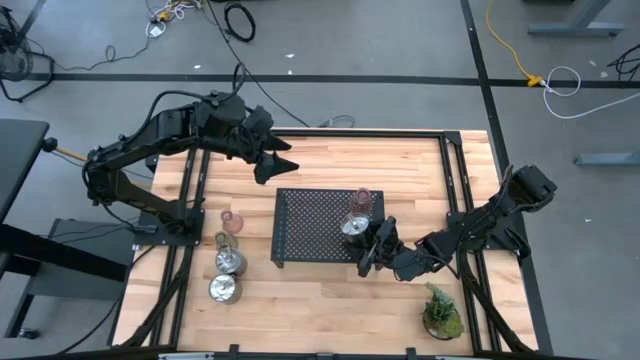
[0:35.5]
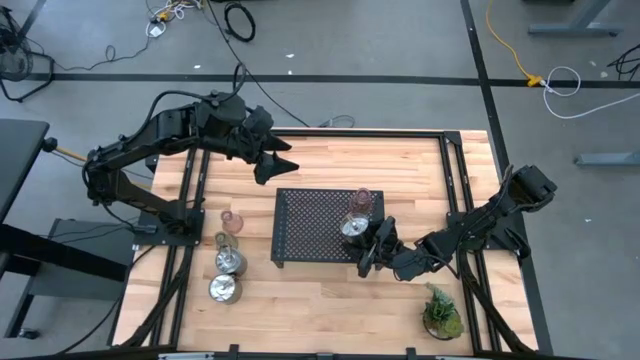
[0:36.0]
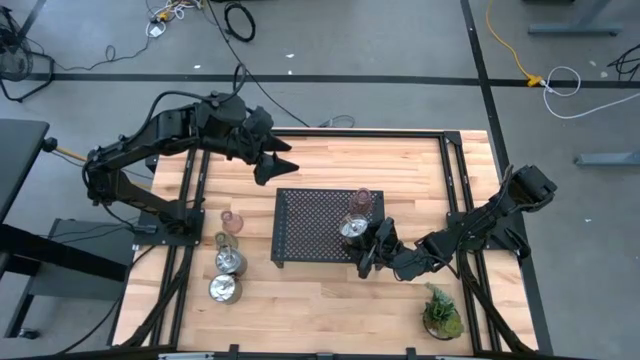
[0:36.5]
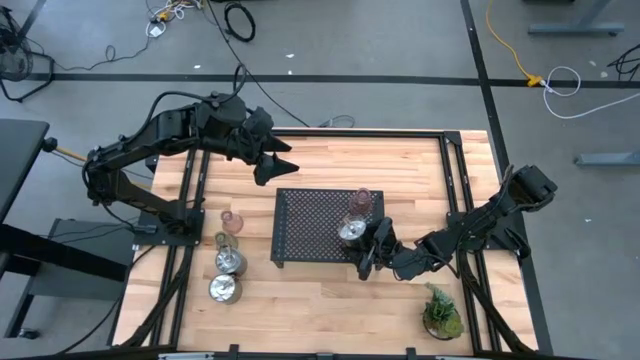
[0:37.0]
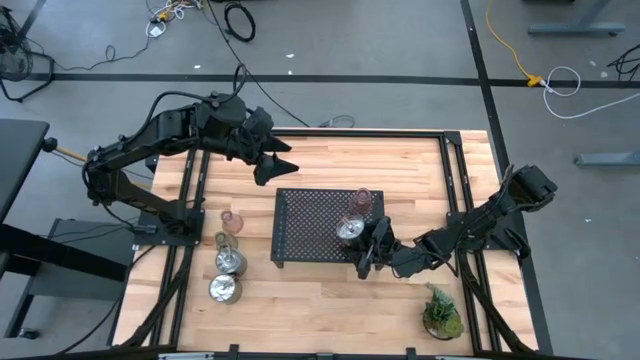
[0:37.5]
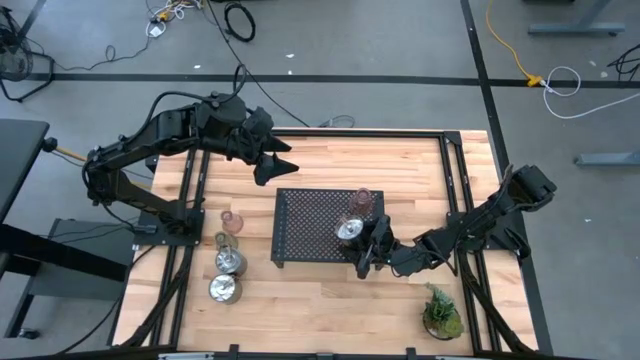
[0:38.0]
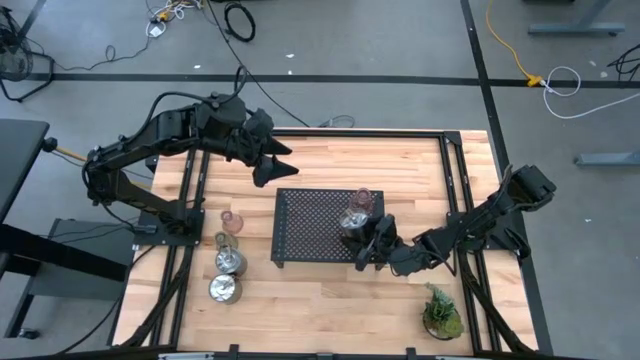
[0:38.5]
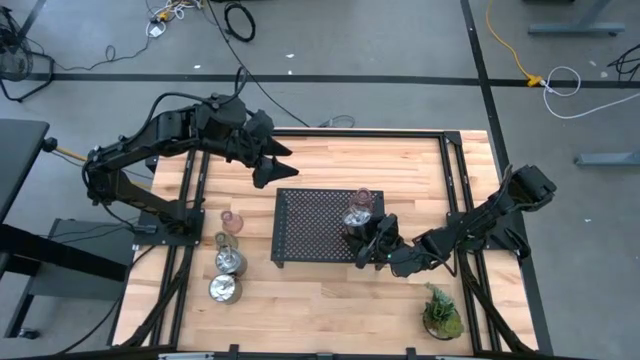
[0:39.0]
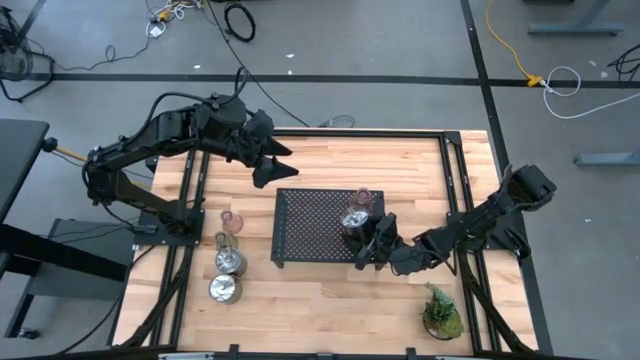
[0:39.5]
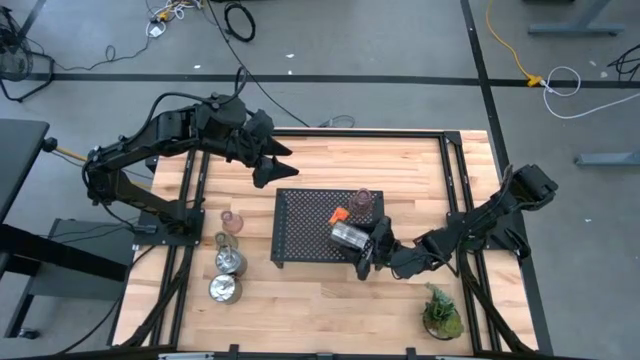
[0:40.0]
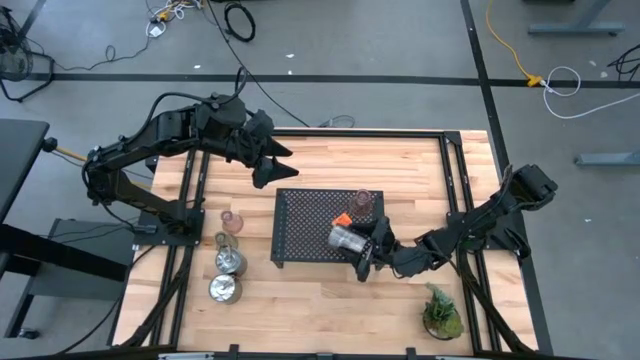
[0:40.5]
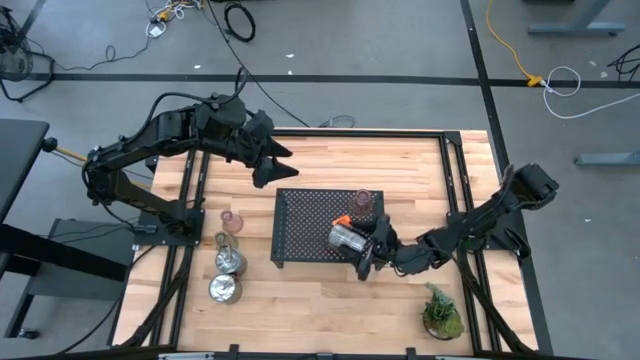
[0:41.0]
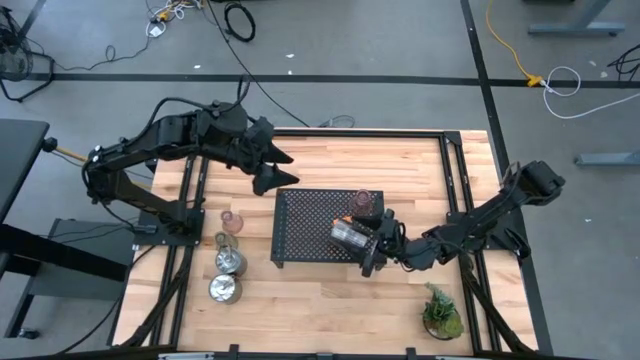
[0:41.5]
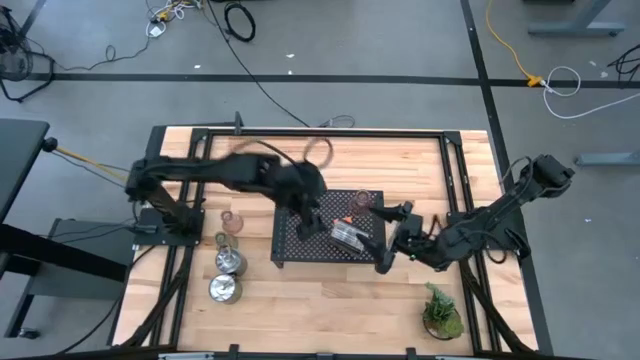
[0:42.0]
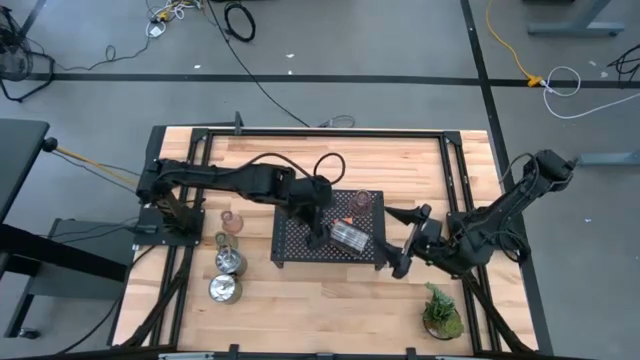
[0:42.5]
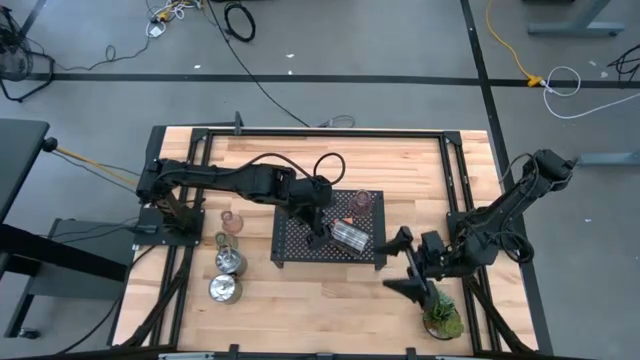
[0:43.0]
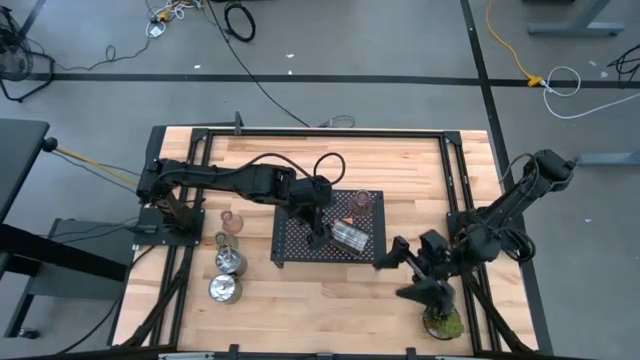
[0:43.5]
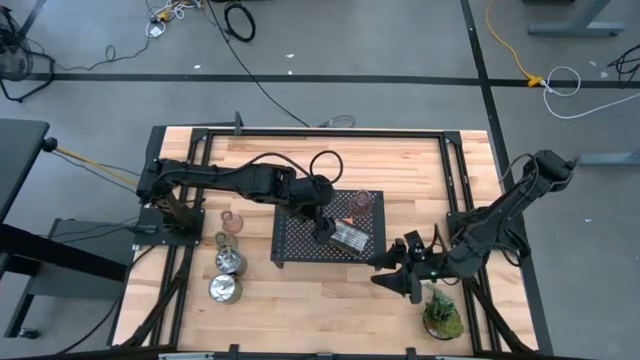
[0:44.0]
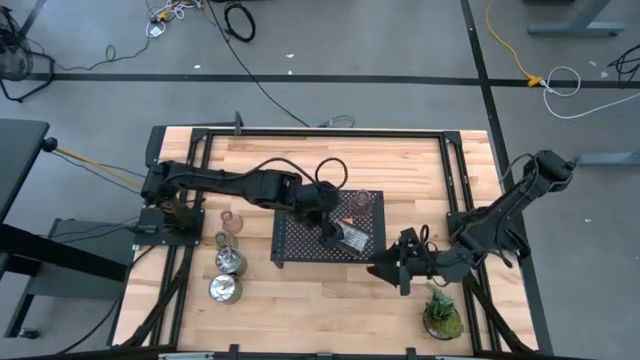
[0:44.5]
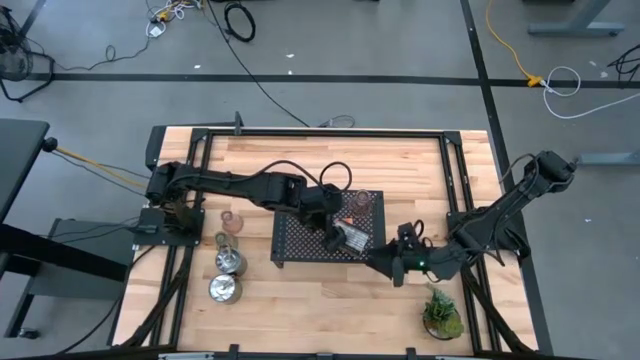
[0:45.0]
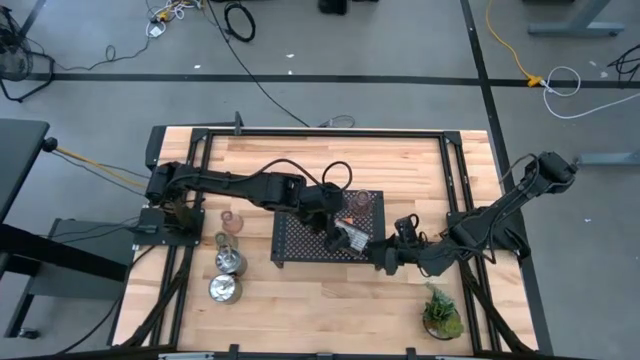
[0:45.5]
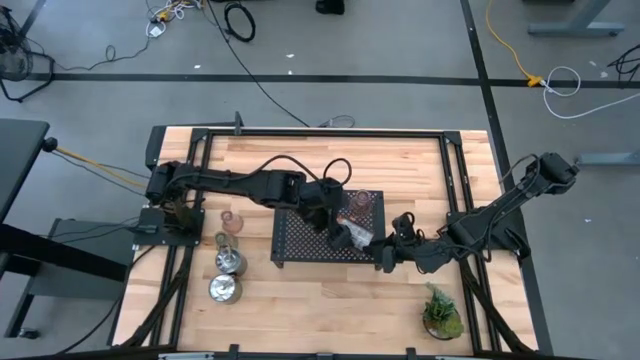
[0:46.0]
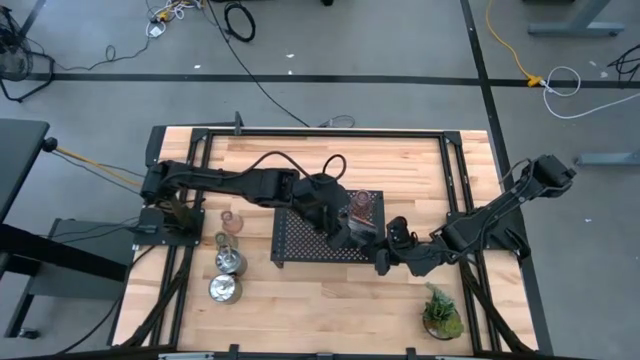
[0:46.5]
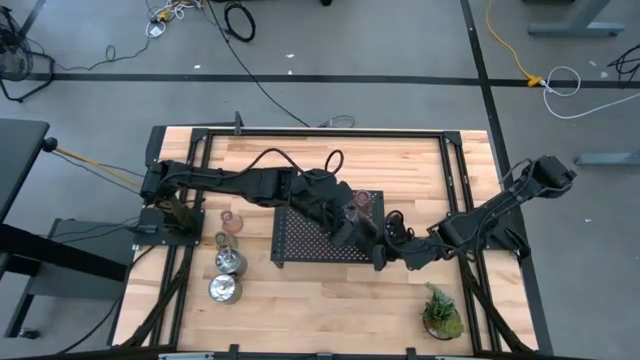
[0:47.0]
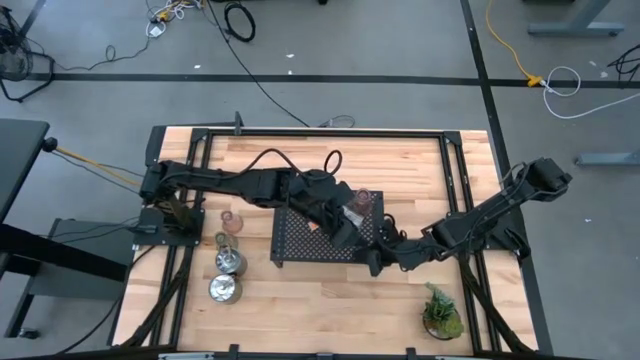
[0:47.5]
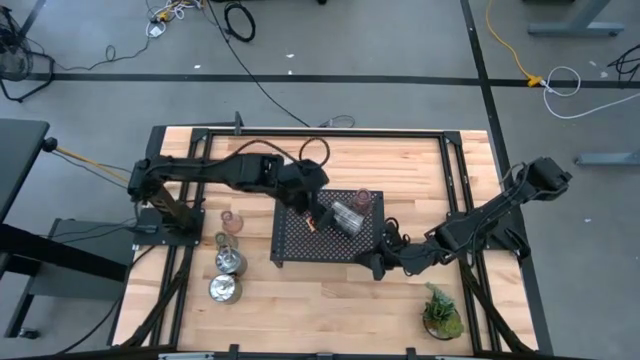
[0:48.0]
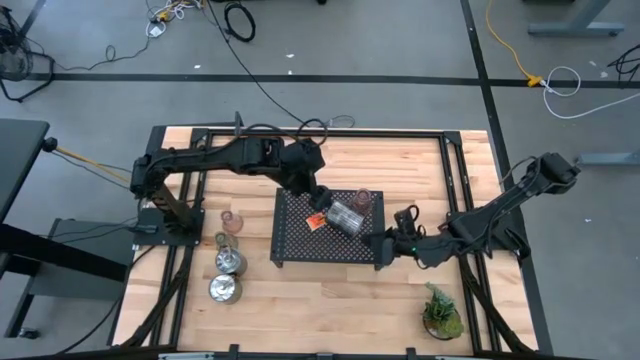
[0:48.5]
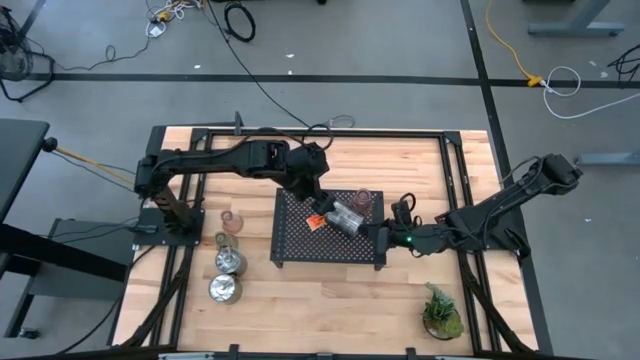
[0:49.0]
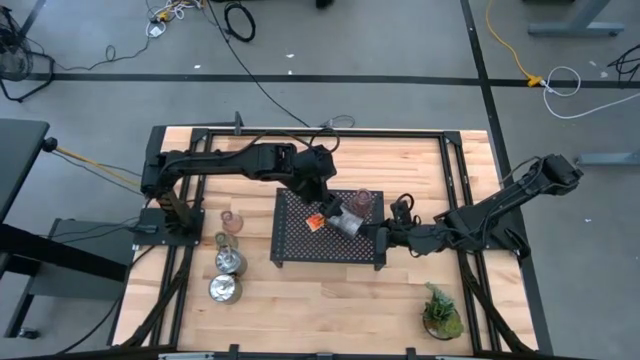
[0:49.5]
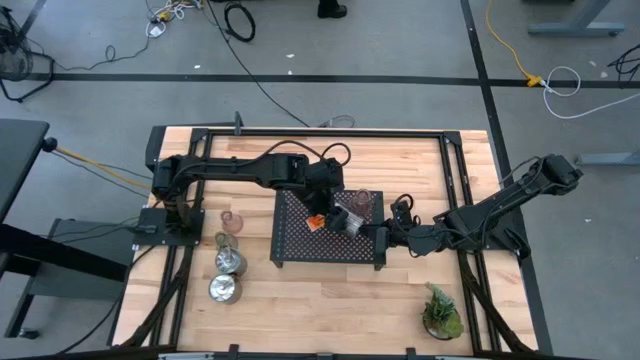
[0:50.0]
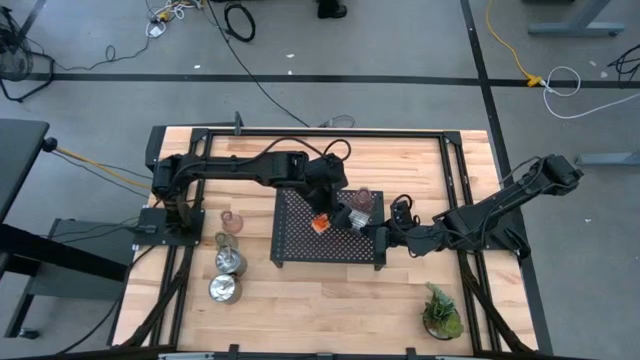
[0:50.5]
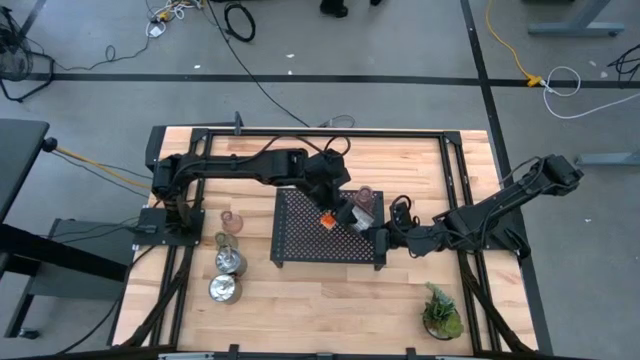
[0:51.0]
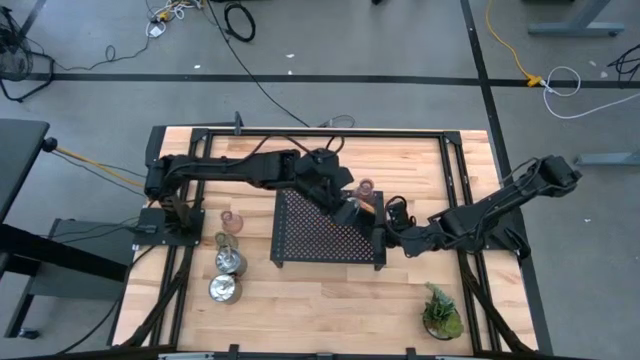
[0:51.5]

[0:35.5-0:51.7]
Task: Pick & Place candle stick holders
Put the silver scented candle on the shelf

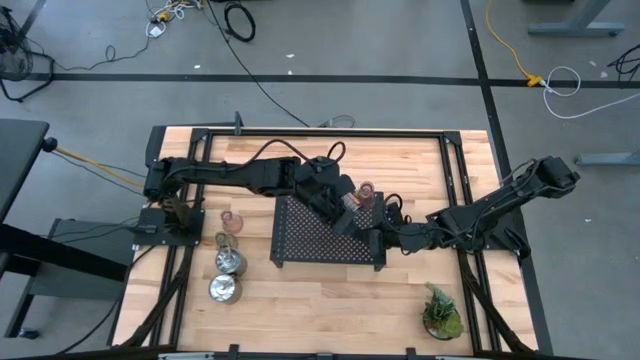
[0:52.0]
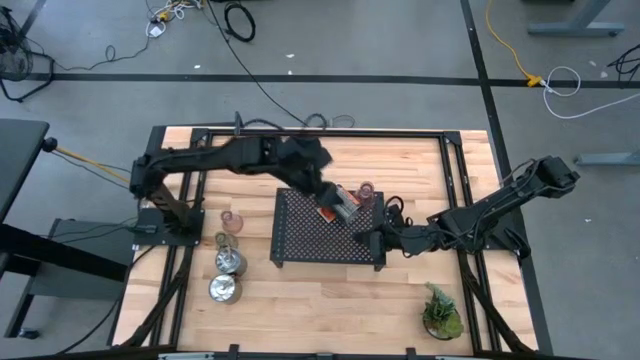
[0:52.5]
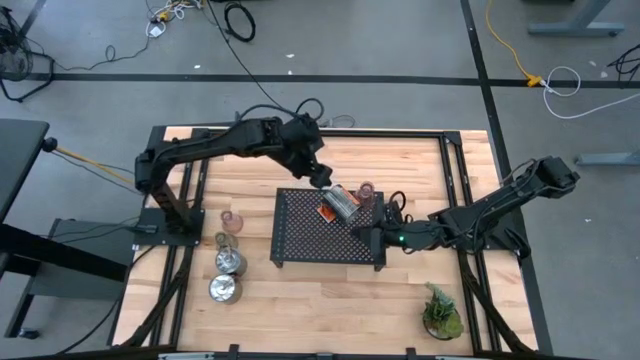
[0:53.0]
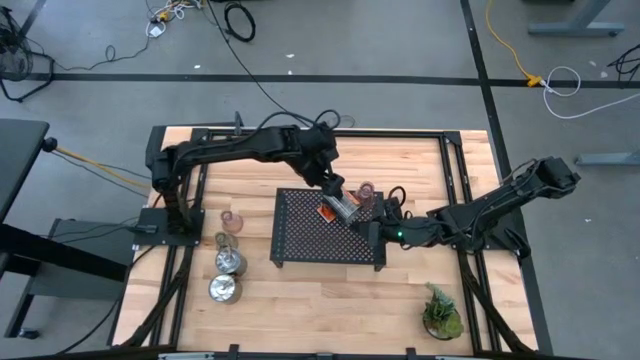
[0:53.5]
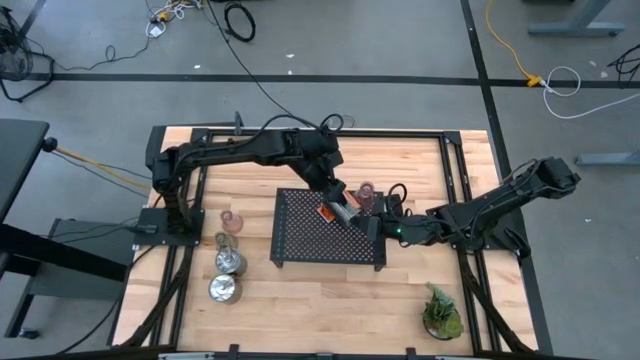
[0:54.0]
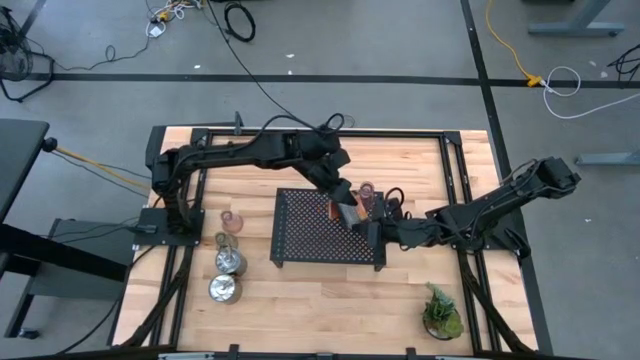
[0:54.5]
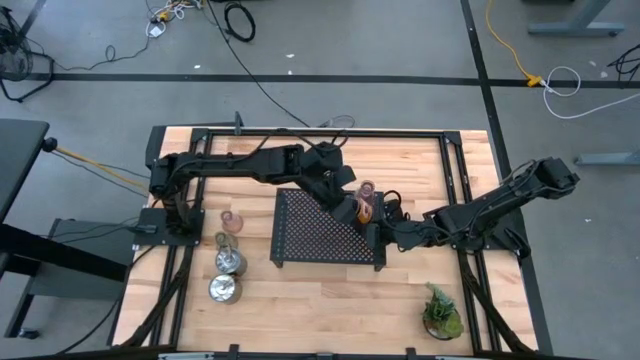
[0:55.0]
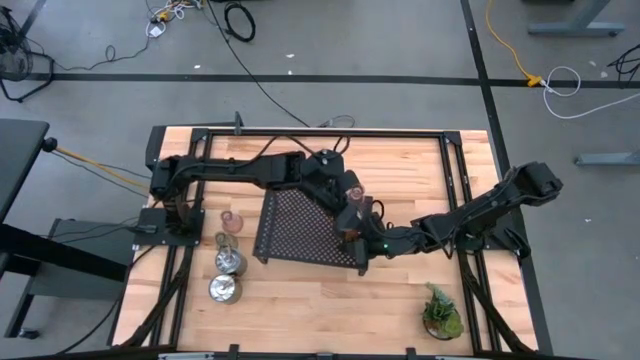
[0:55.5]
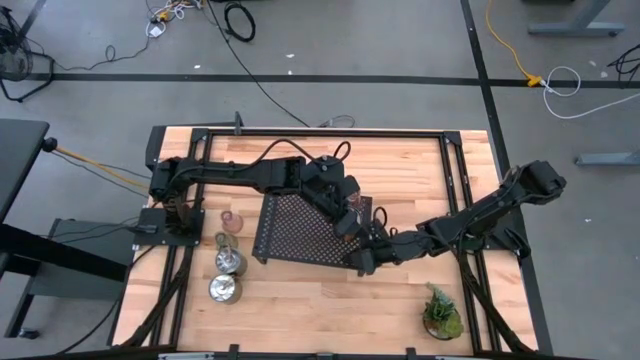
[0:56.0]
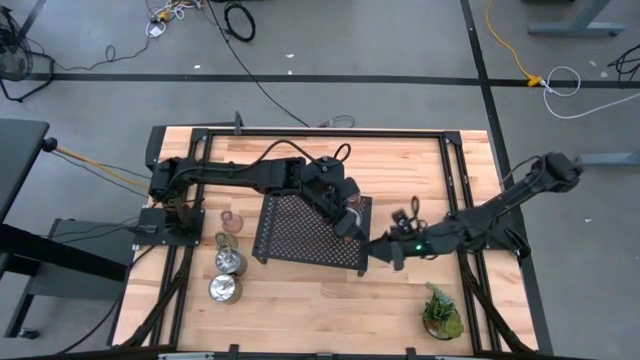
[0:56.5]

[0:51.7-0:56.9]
Put the silver scented candle on the shelf
